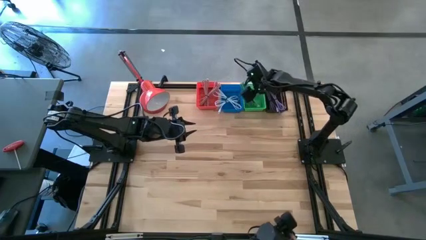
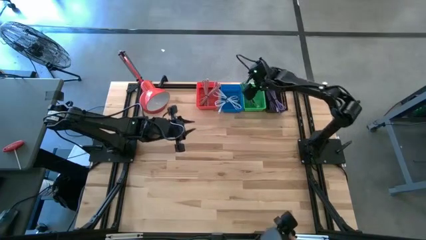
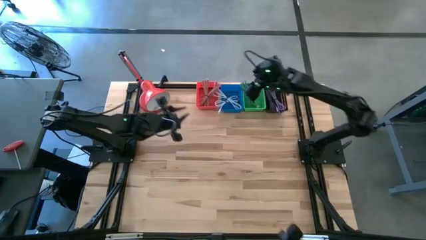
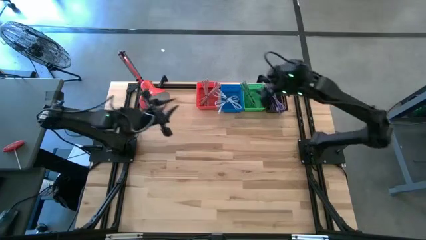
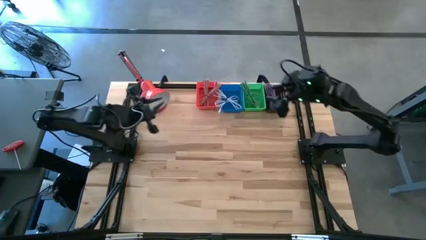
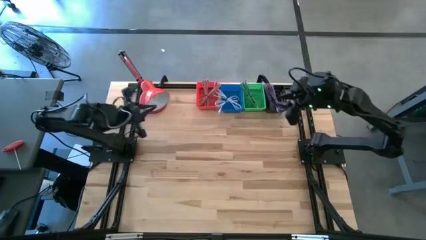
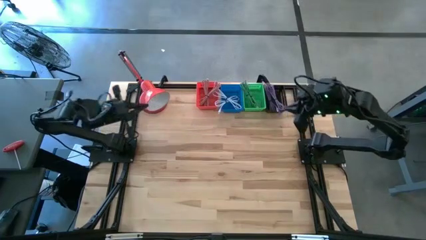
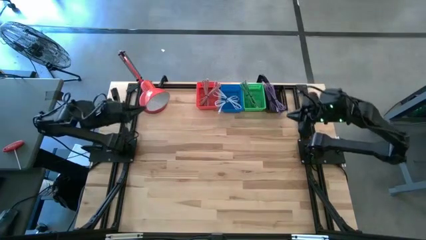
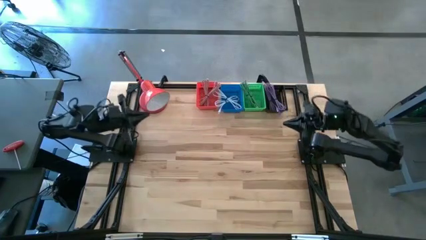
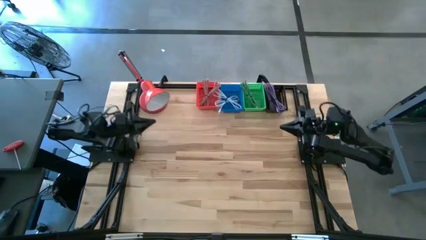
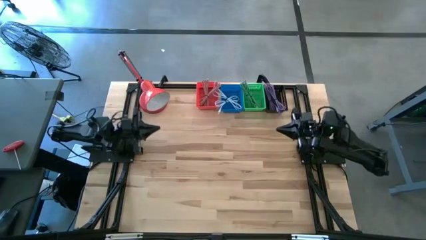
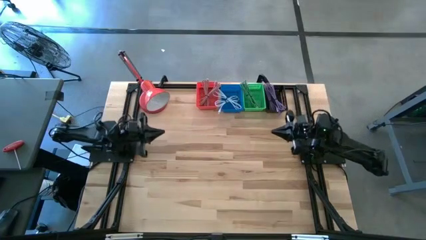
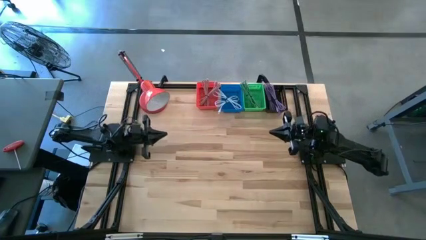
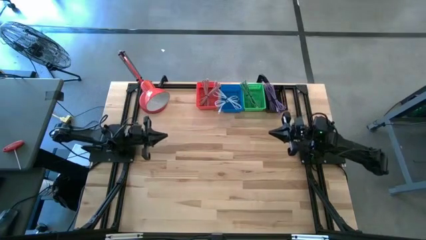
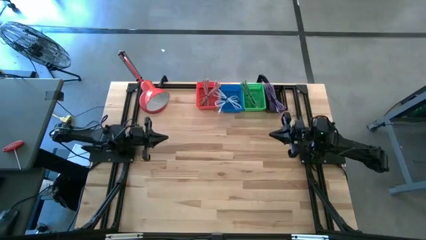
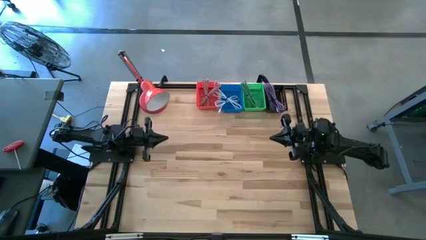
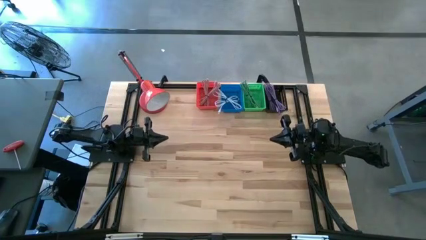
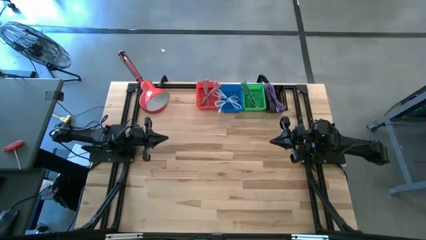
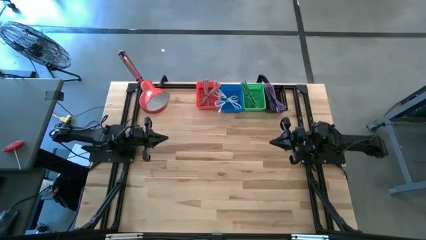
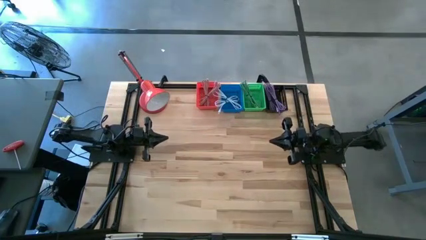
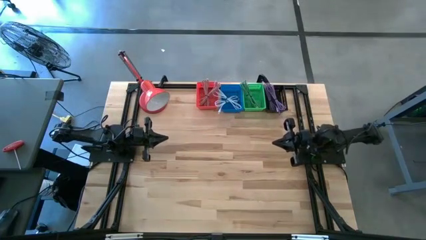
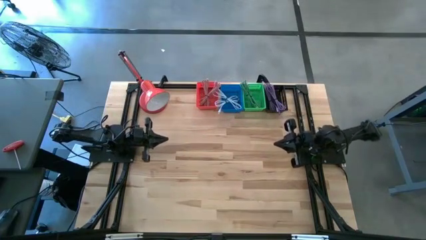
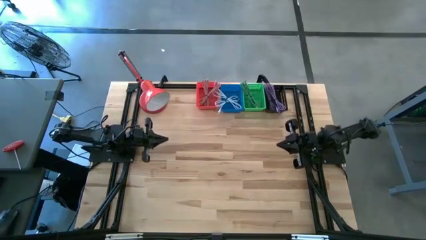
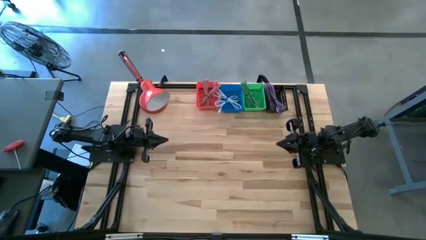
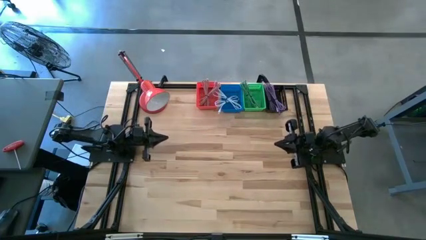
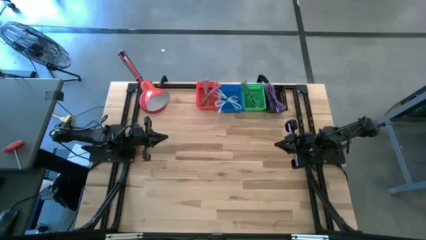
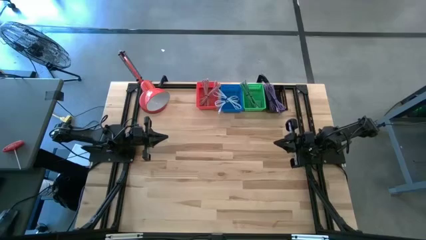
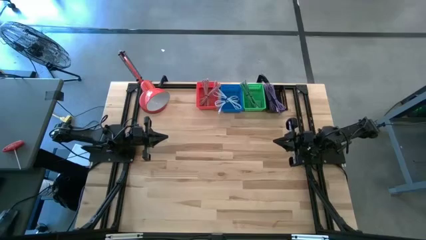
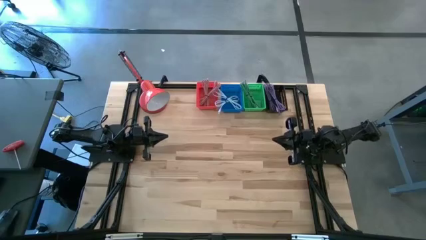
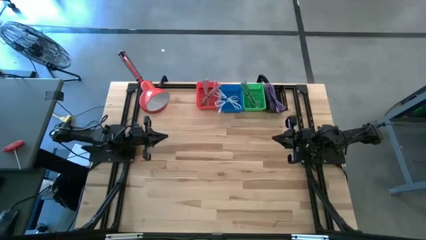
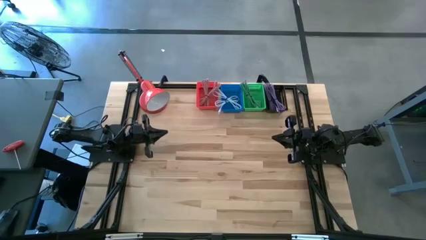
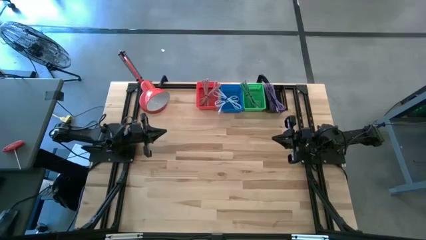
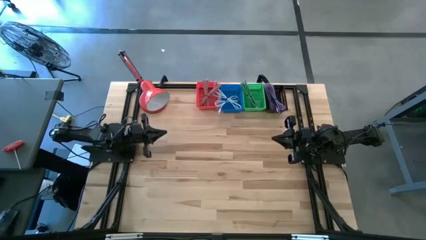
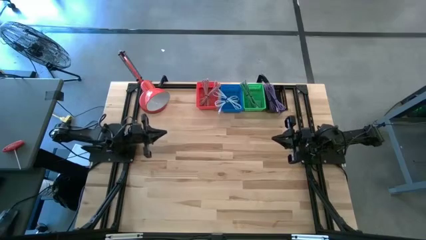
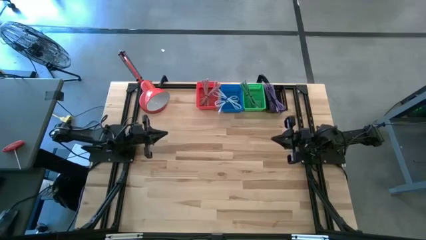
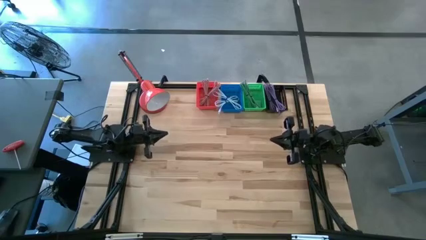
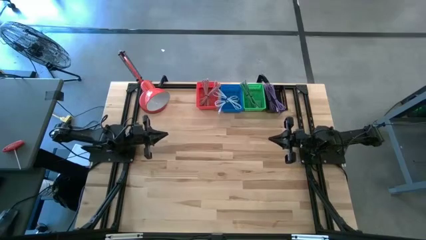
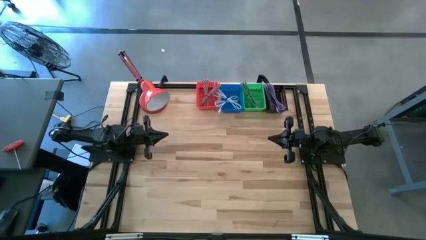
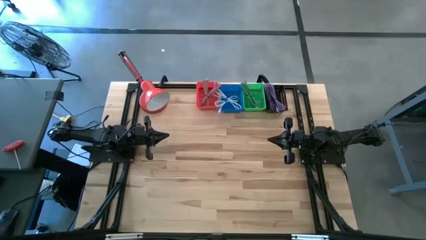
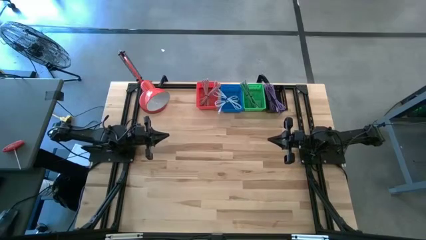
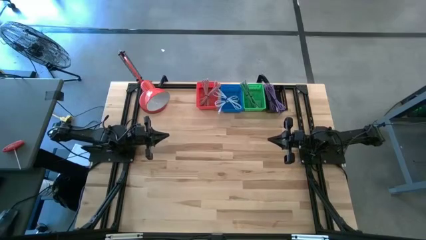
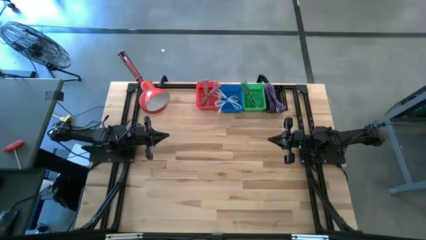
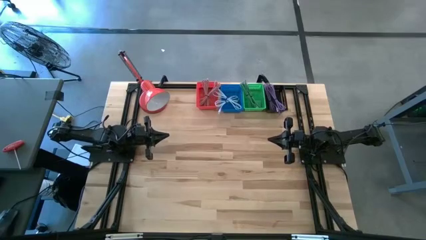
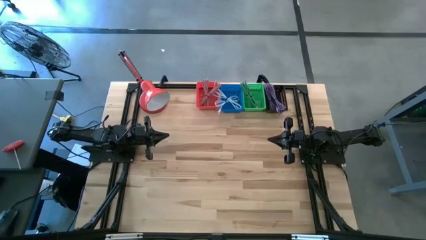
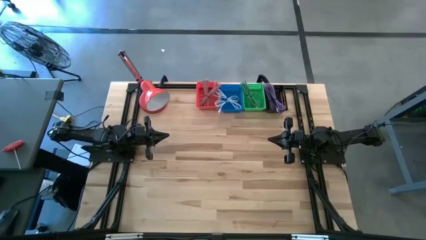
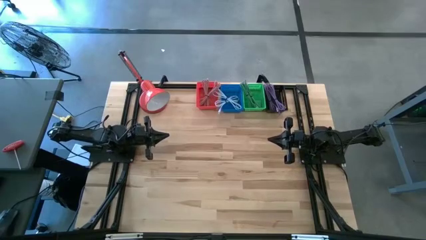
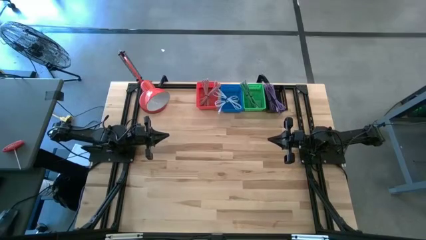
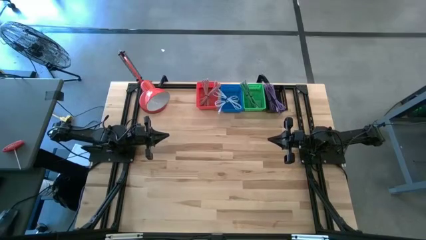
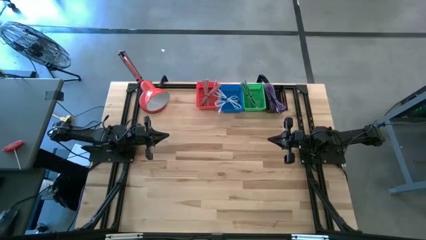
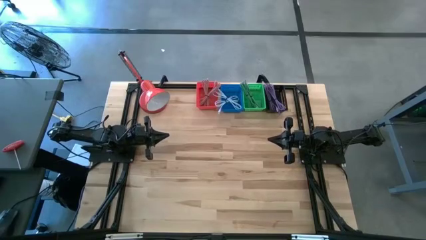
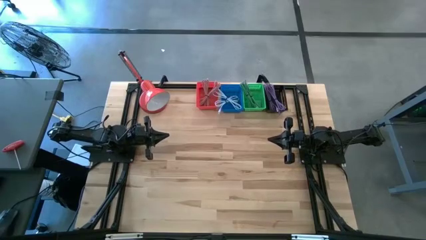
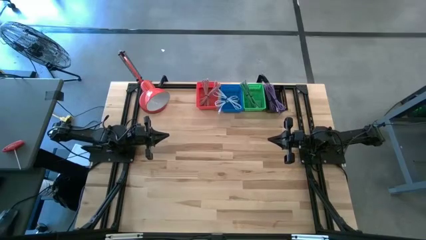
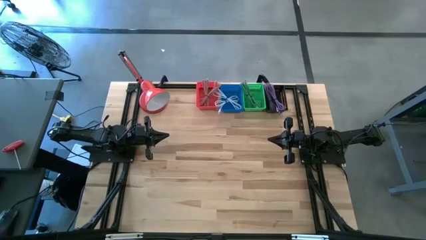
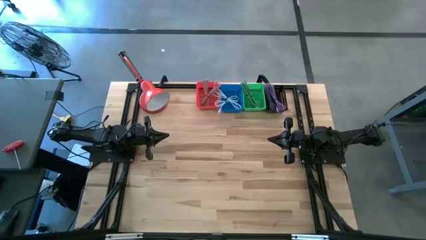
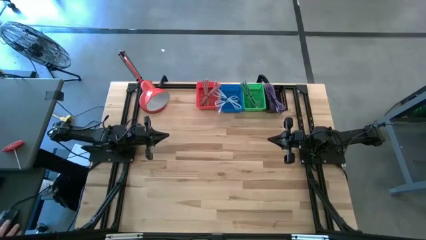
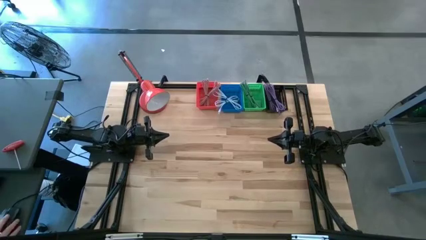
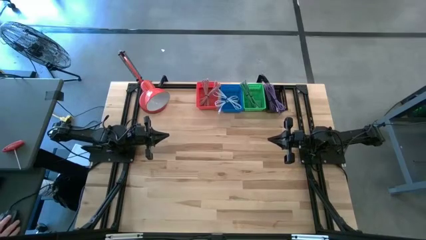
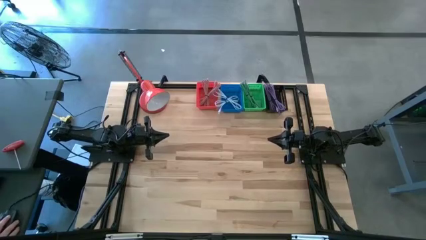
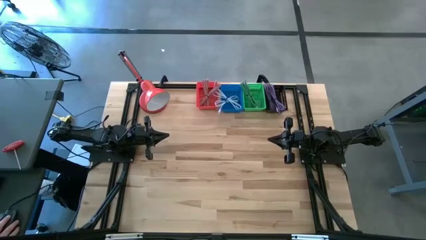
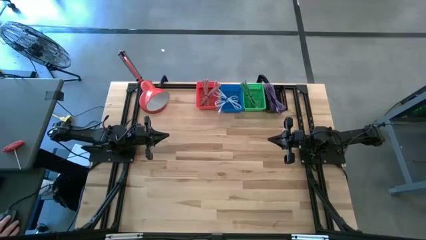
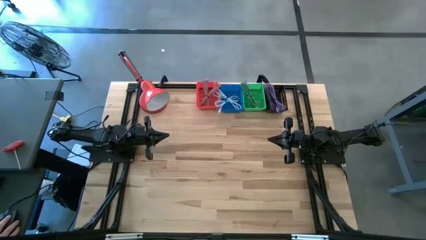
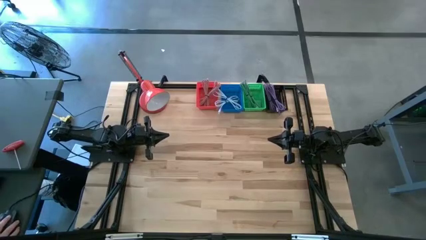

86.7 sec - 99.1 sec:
Task: Pick & Place USB Port
Return to Home Position

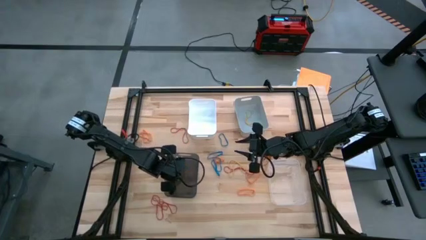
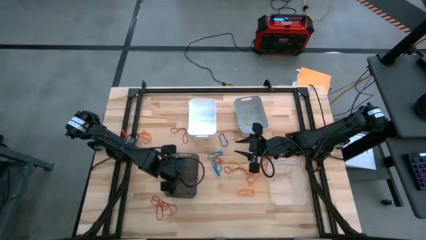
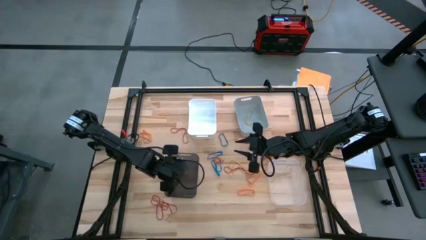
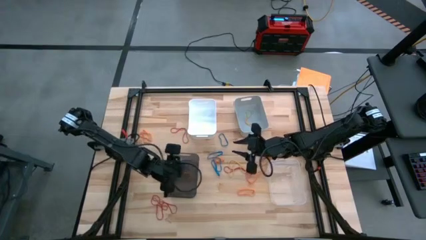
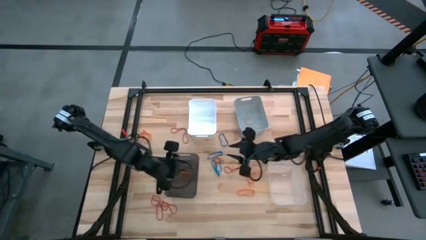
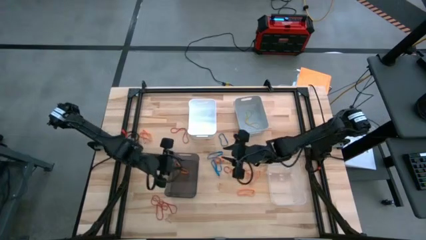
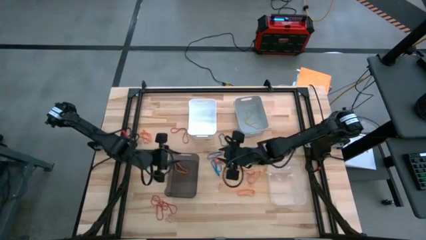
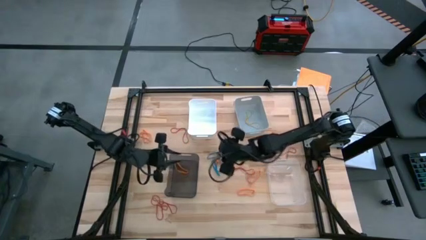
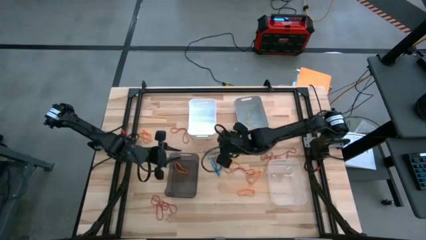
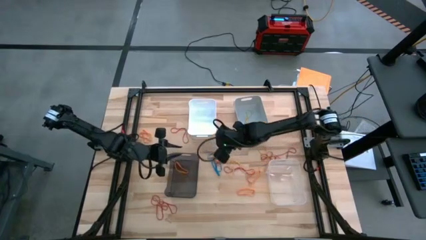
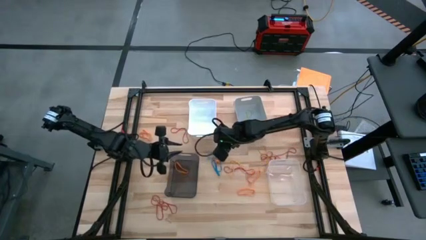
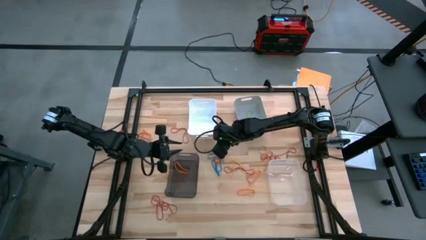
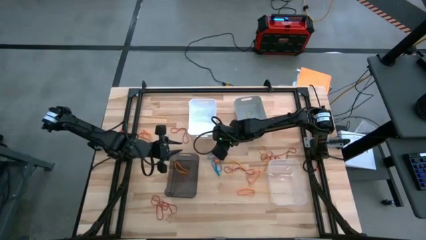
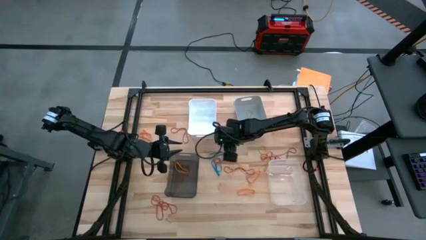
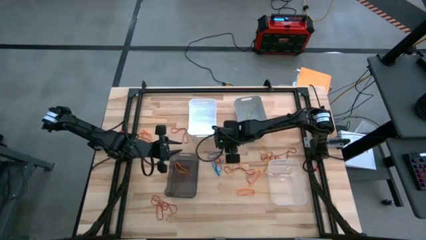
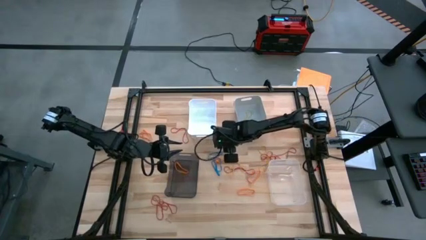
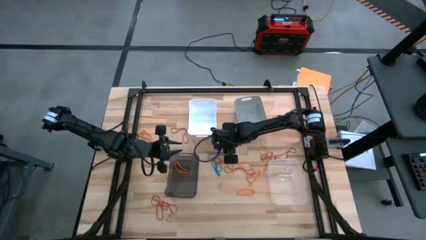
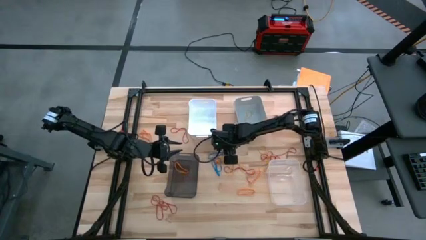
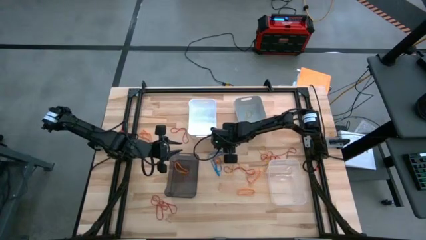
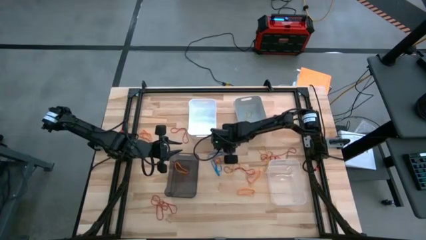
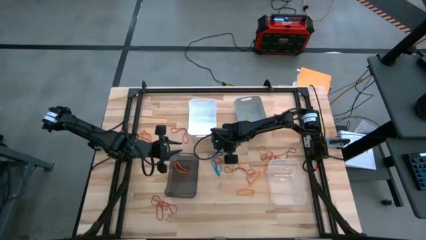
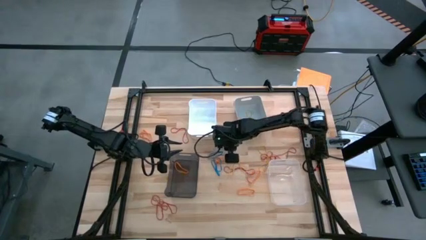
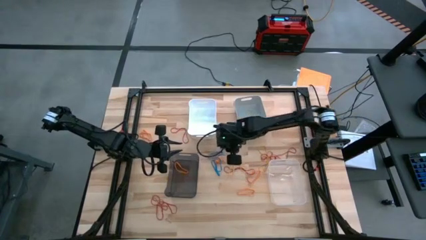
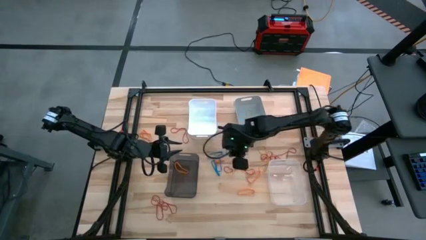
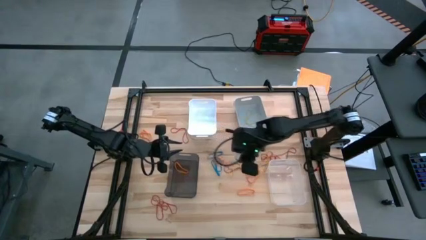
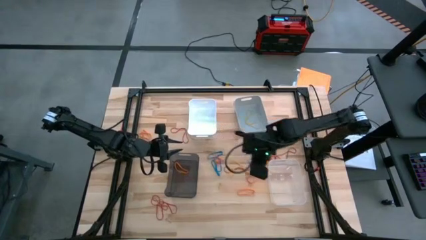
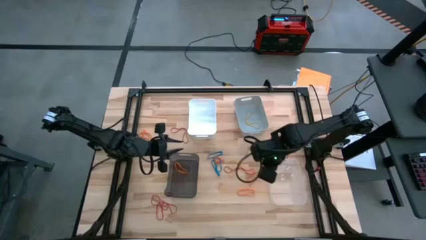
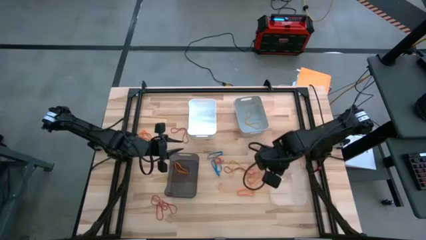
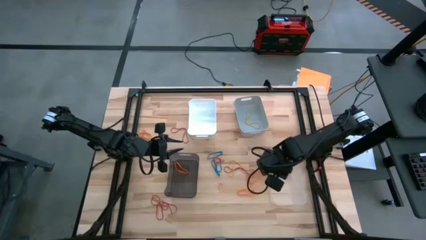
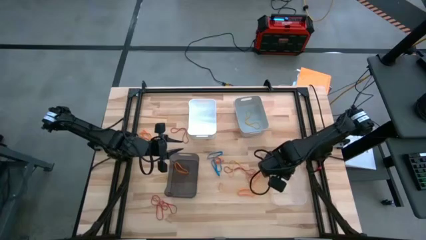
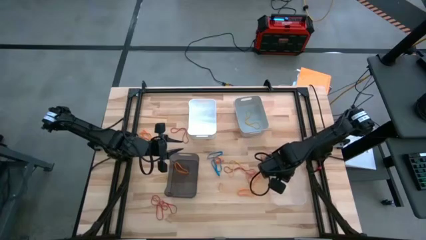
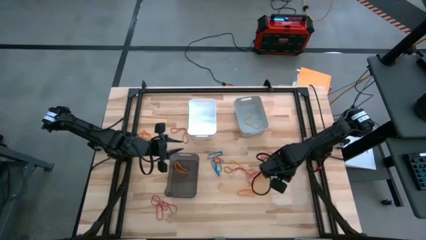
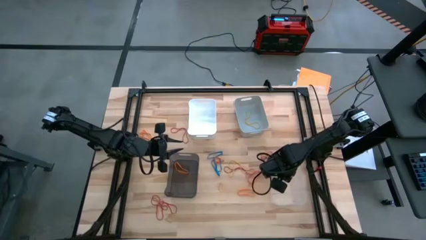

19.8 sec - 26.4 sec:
Task: Sort rubber bands into baskets
Put the blue rubber band into the transparent bin
